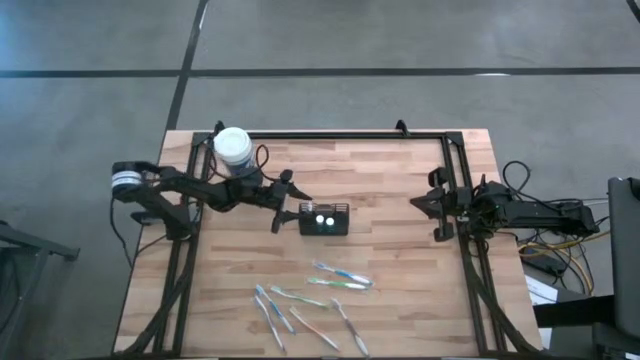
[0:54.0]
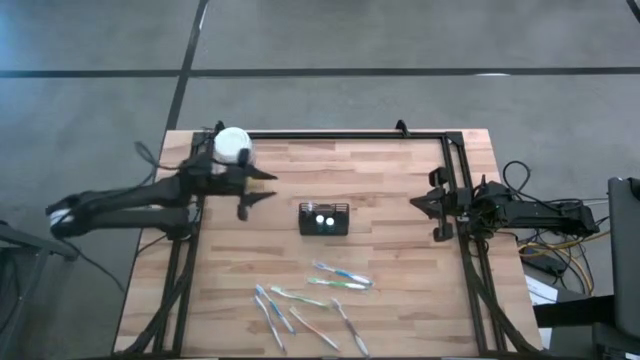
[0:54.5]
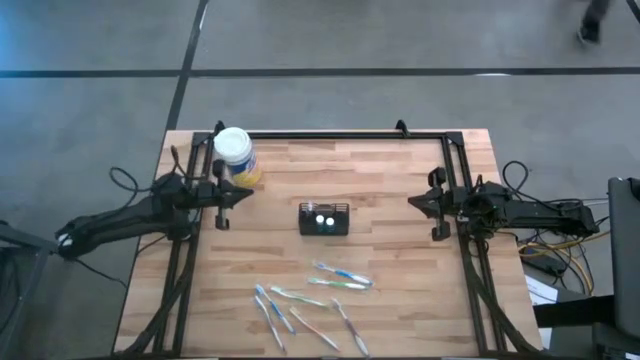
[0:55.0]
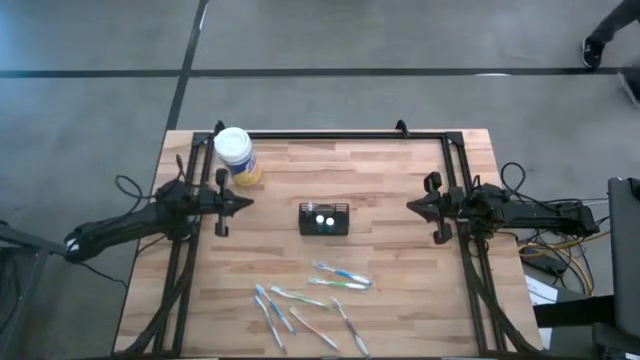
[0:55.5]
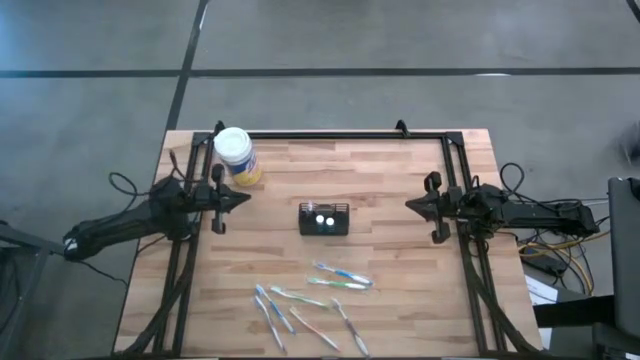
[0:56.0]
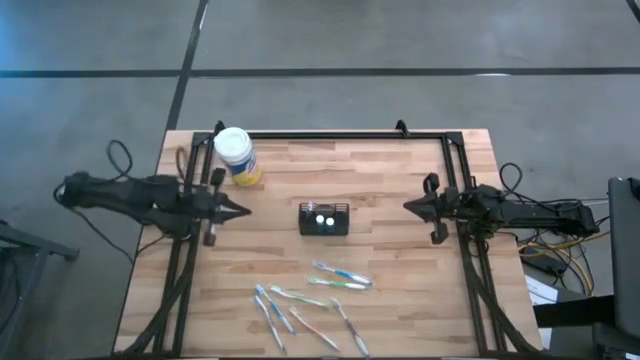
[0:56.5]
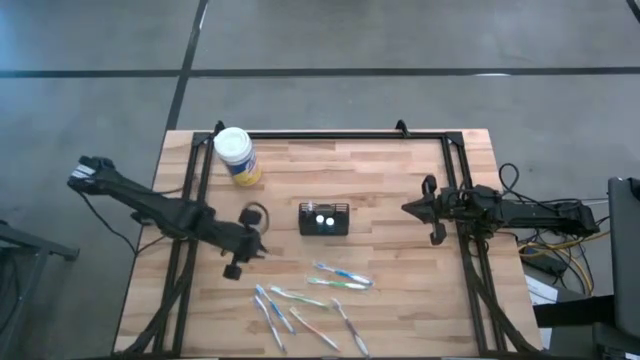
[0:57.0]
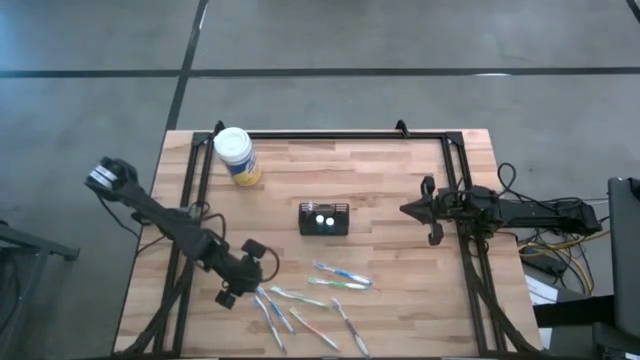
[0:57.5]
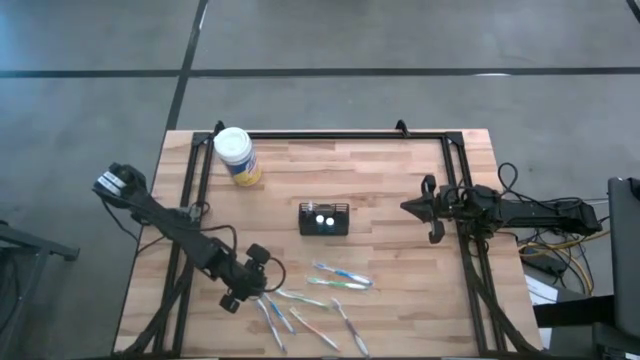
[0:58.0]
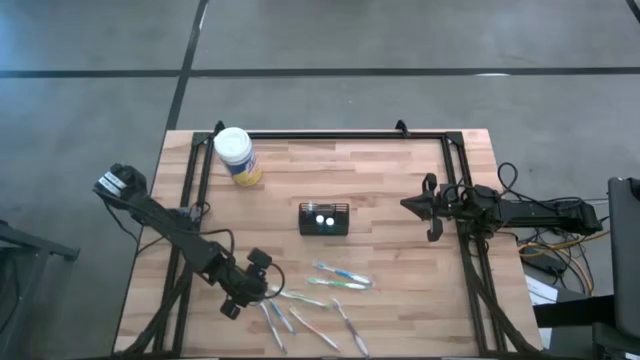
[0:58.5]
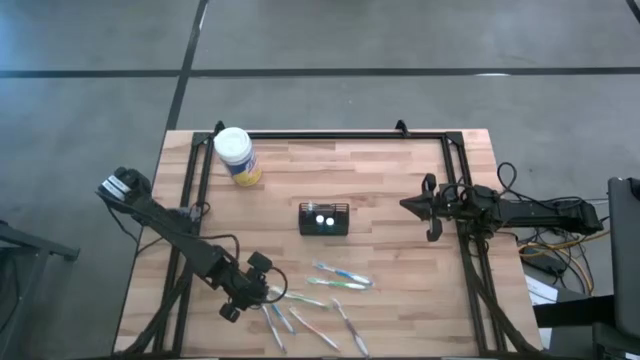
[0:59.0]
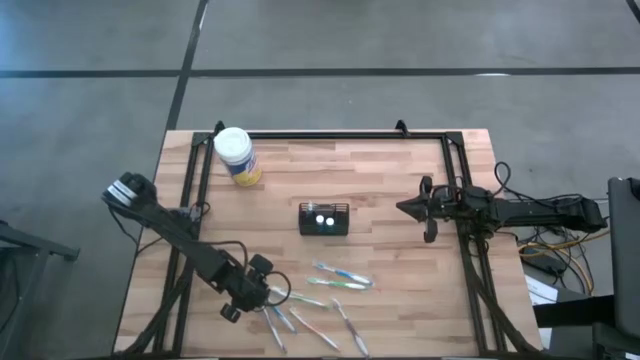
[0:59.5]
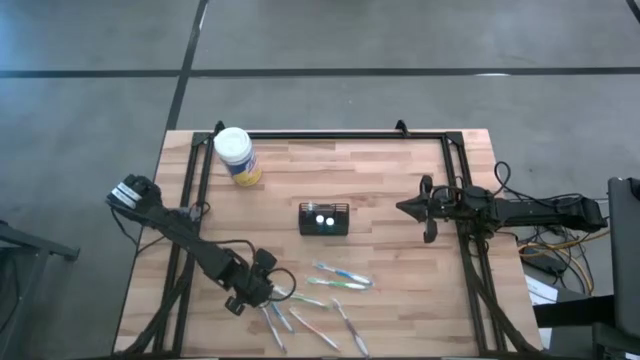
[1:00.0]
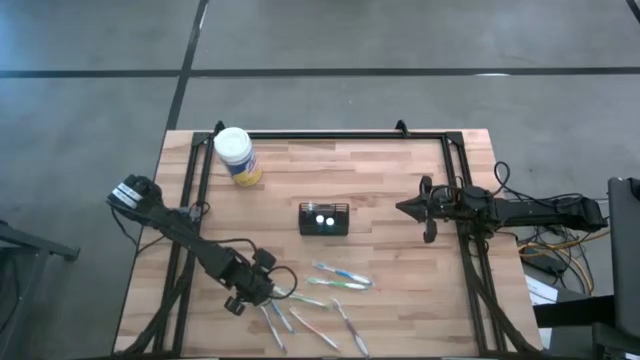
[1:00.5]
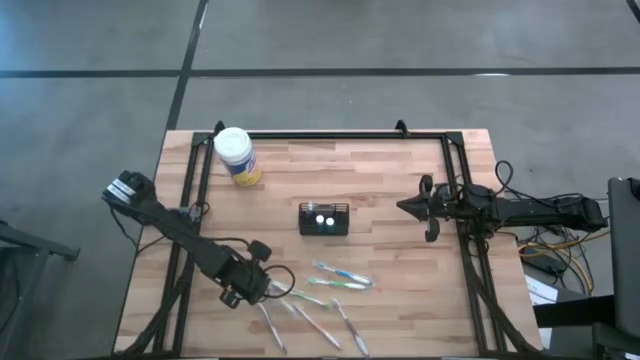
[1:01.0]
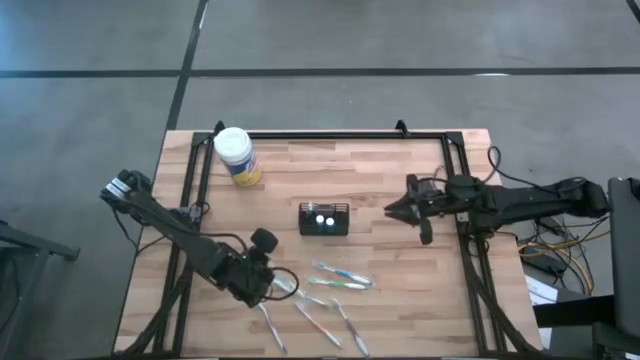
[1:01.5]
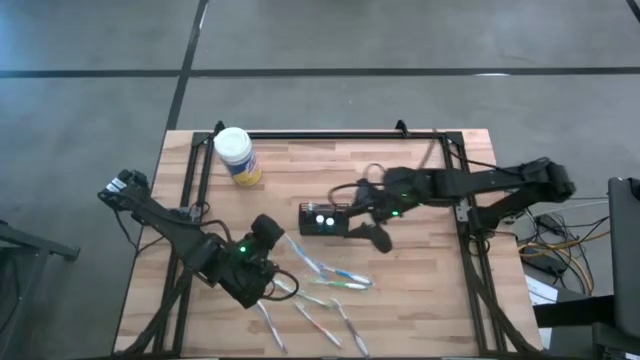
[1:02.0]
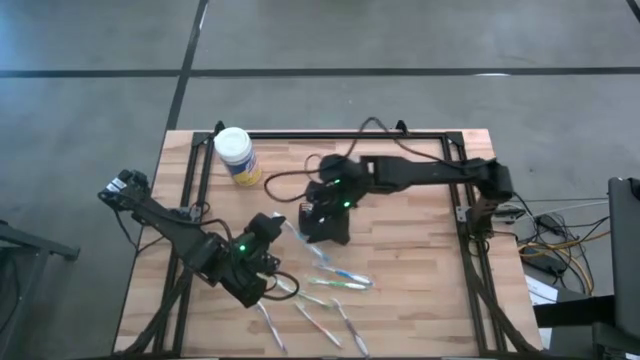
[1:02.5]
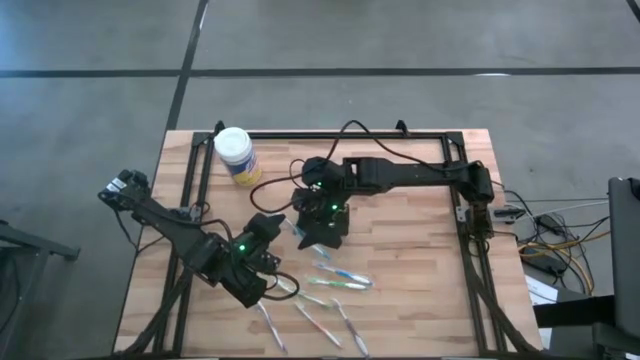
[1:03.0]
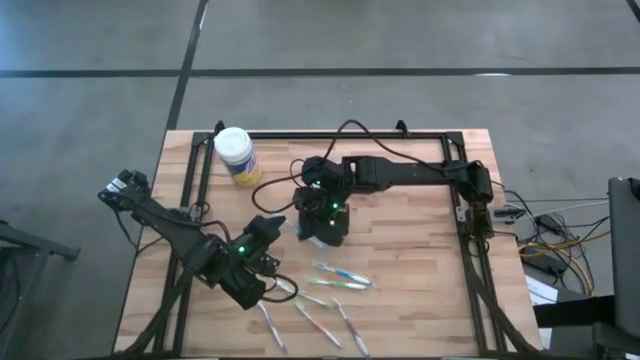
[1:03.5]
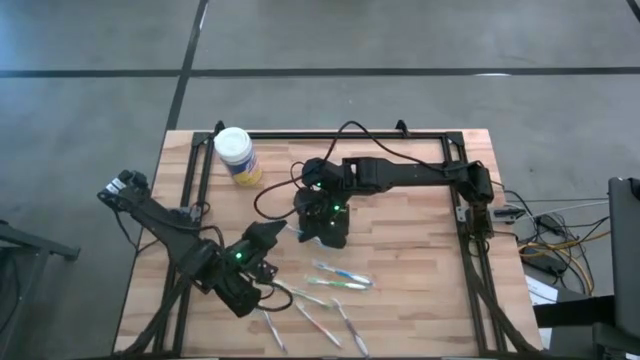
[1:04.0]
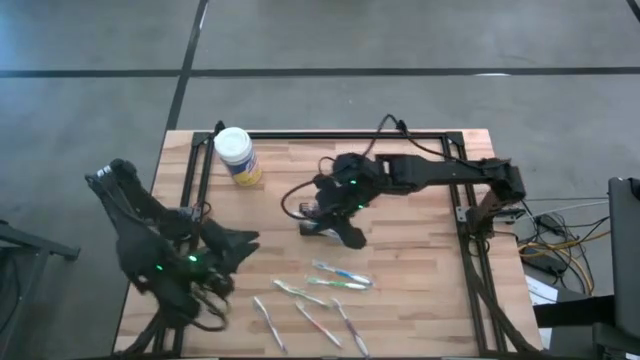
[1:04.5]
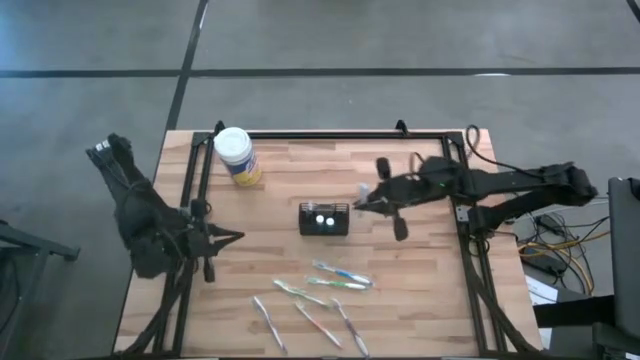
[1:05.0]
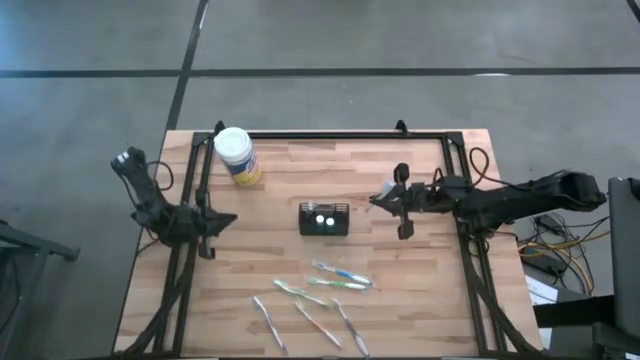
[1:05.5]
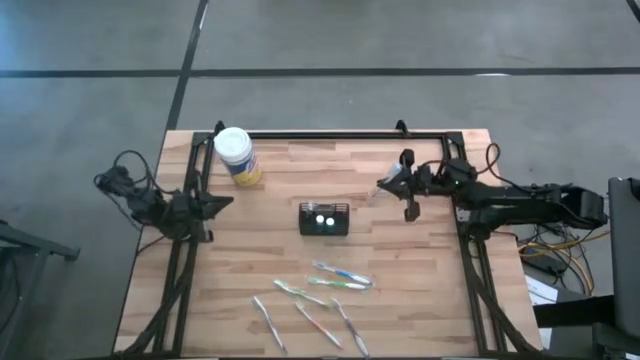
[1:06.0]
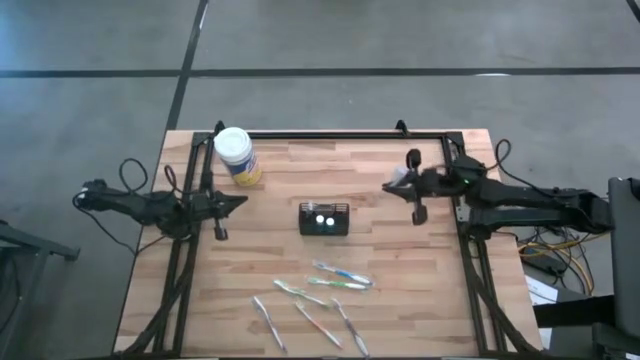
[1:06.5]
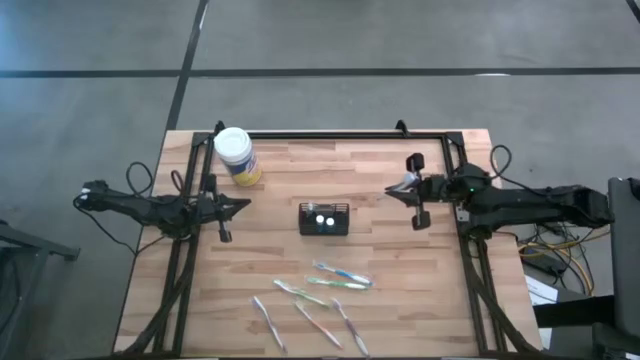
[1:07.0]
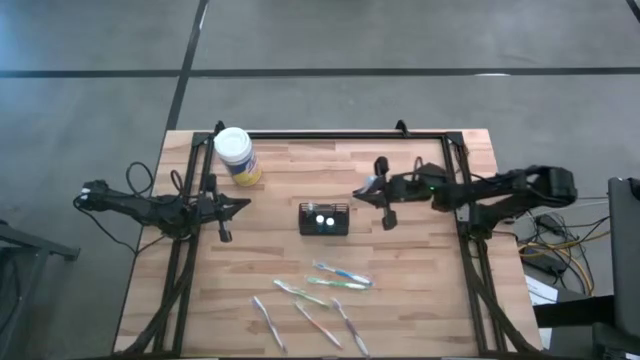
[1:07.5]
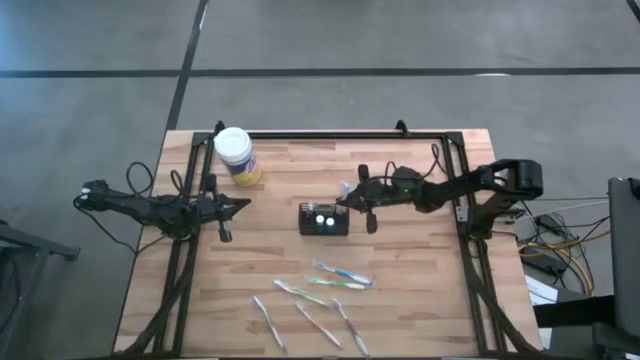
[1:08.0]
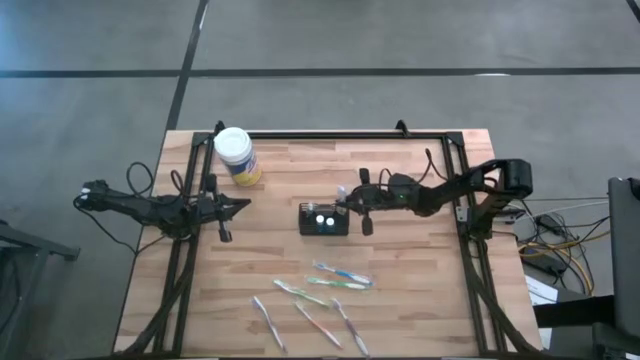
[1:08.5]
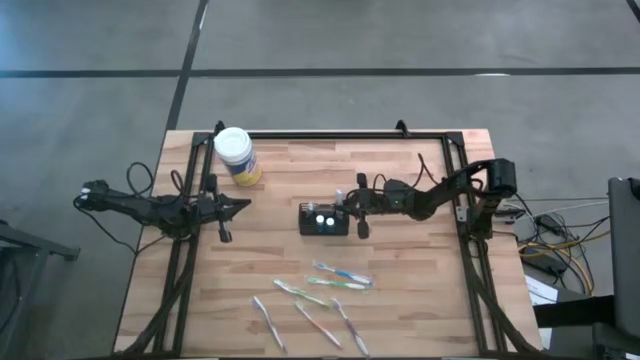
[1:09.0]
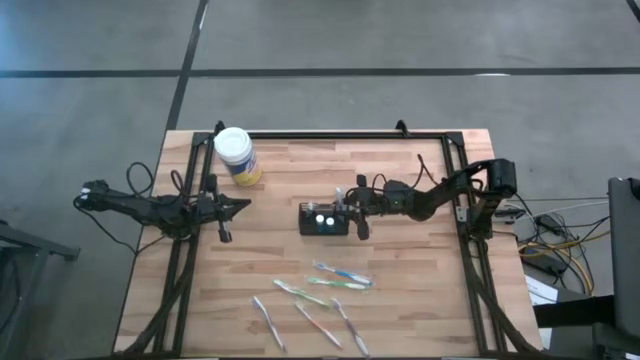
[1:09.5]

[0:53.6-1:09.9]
Task: Pick & Place toothbrushing station
Put the left blue toothbrush into the mesh organizer

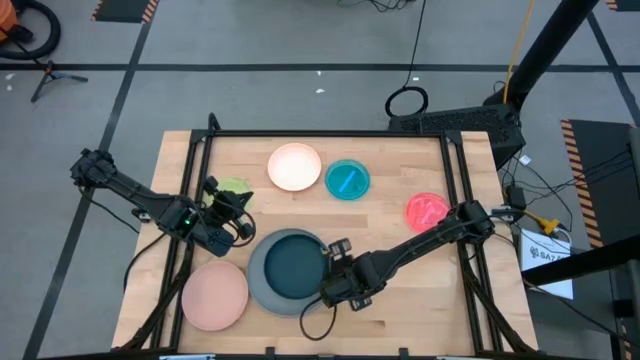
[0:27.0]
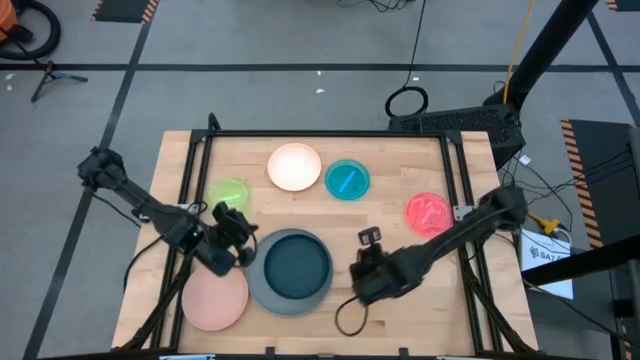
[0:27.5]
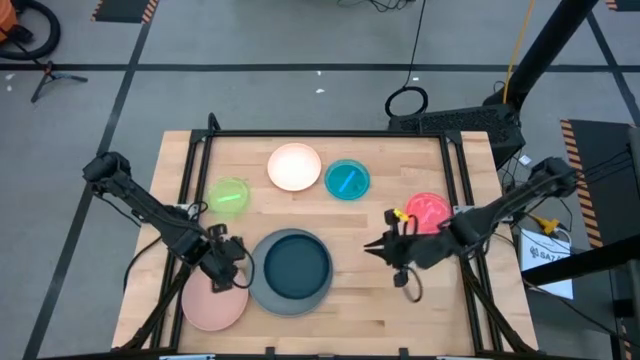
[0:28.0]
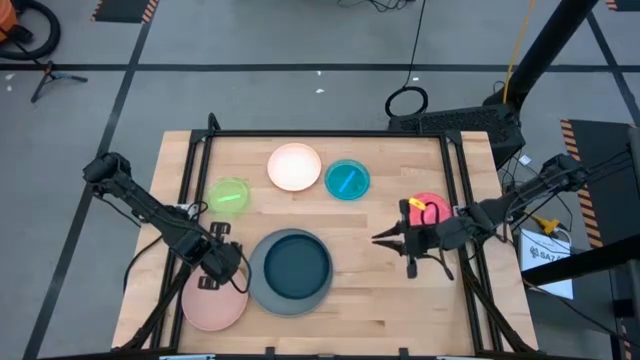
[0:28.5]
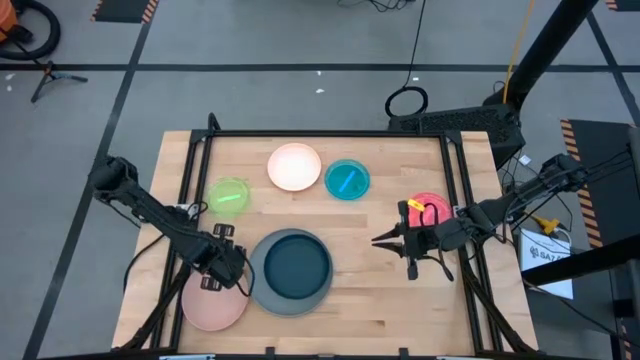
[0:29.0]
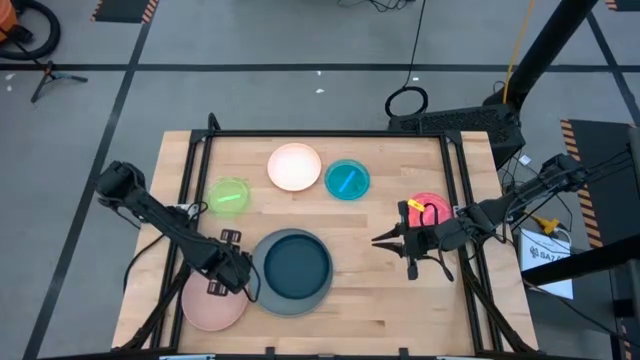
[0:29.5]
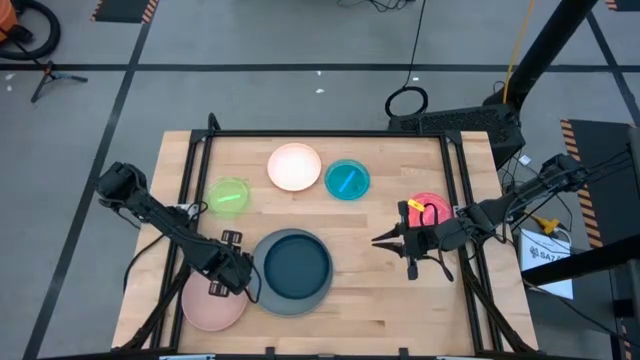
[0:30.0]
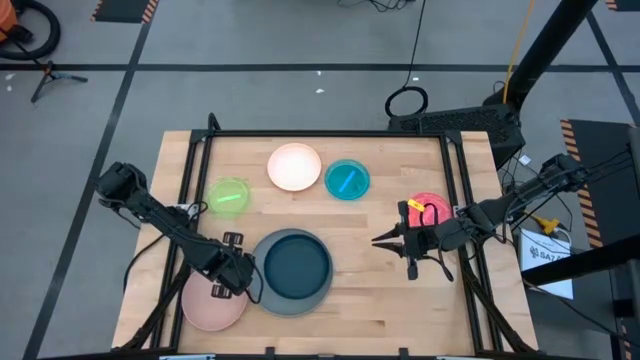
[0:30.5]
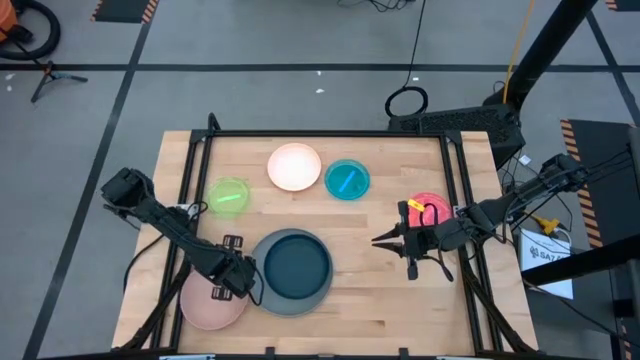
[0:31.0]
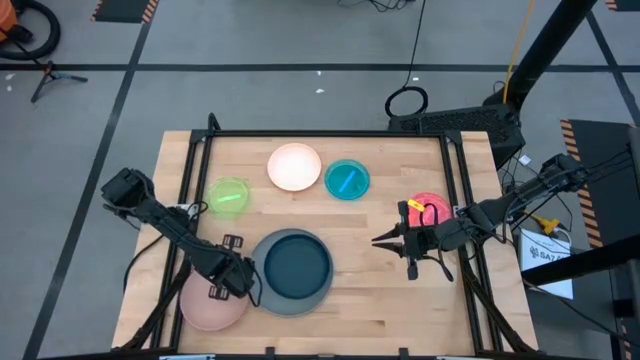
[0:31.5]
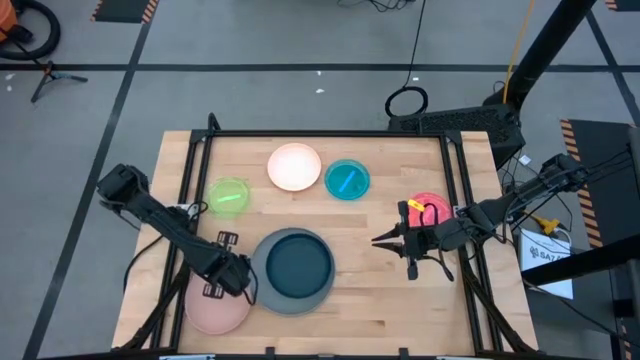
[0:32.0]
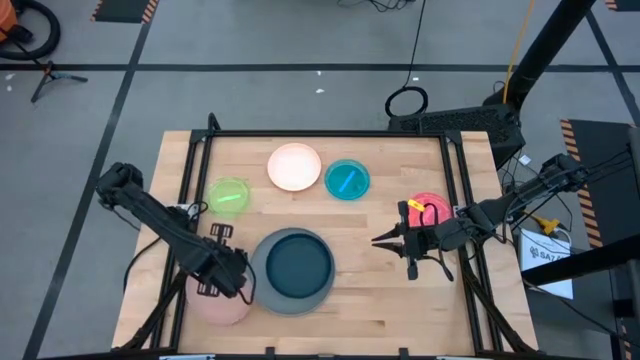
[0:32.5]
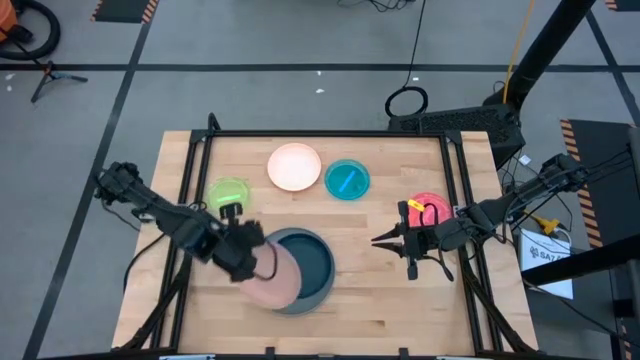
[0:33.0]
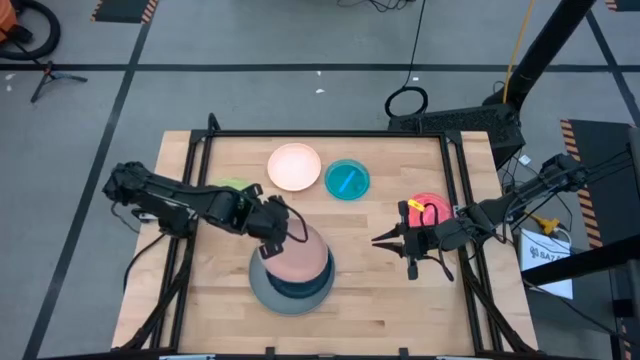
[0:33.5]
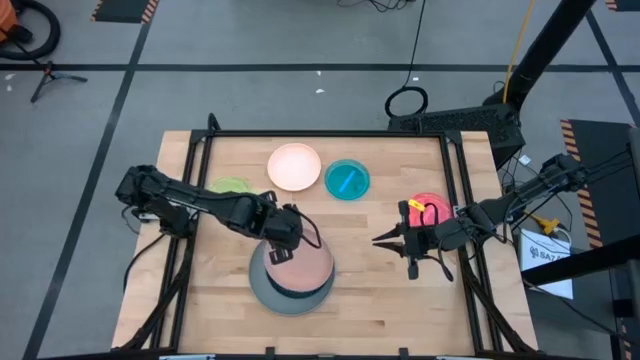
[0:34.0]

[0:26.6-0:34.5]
Task: Stack plastic plates
Stack the orange plate on top of the black plate
